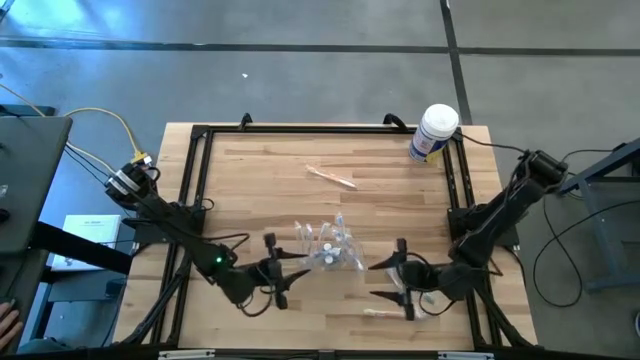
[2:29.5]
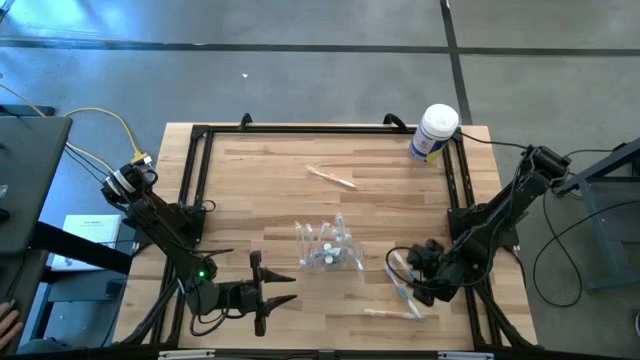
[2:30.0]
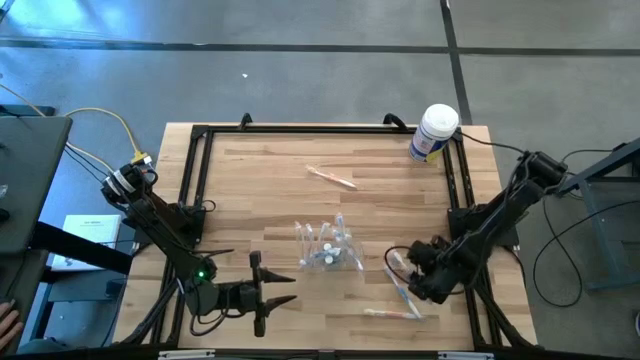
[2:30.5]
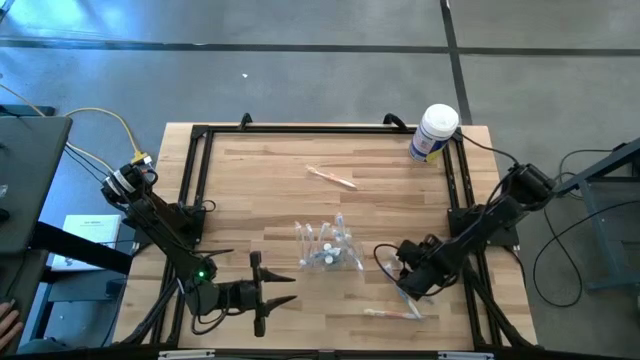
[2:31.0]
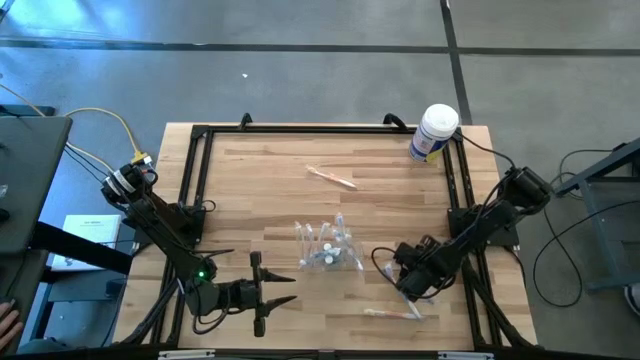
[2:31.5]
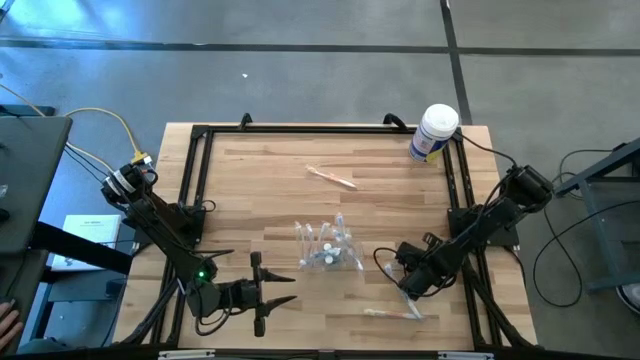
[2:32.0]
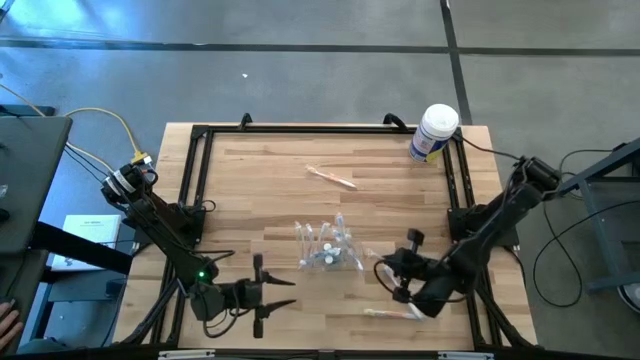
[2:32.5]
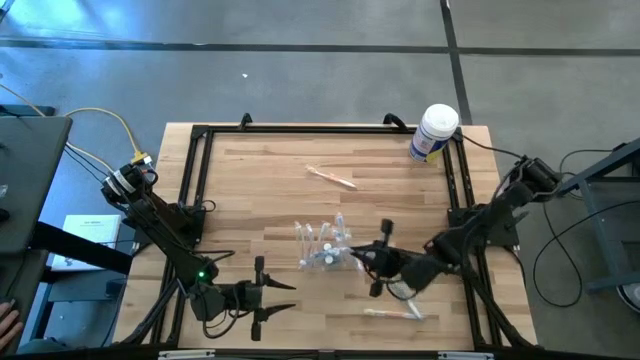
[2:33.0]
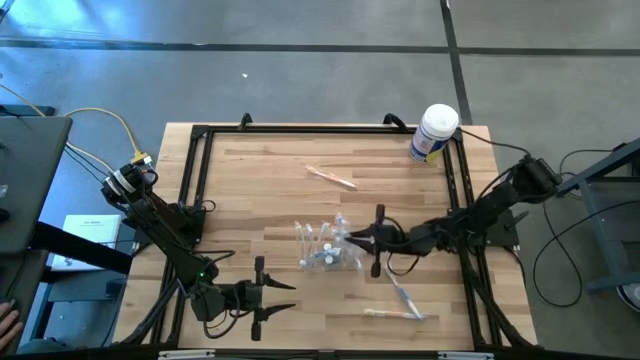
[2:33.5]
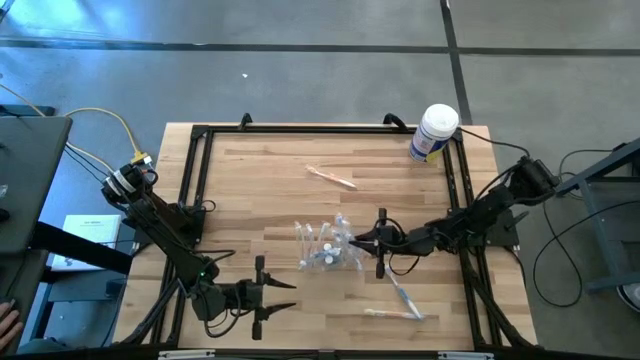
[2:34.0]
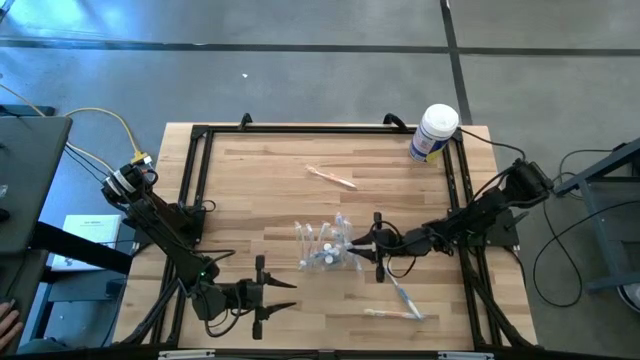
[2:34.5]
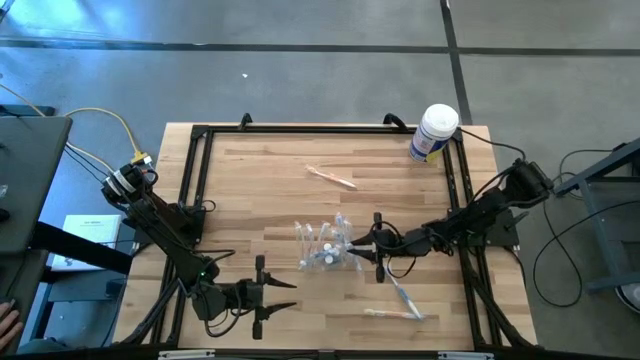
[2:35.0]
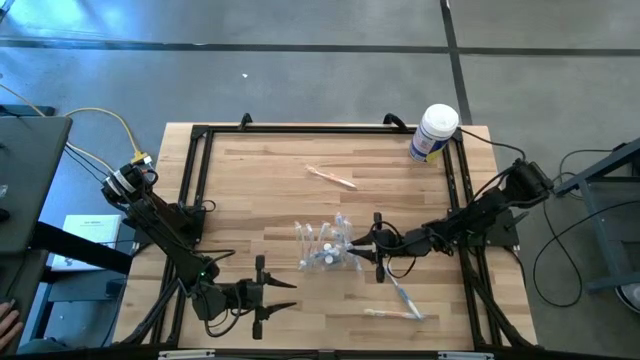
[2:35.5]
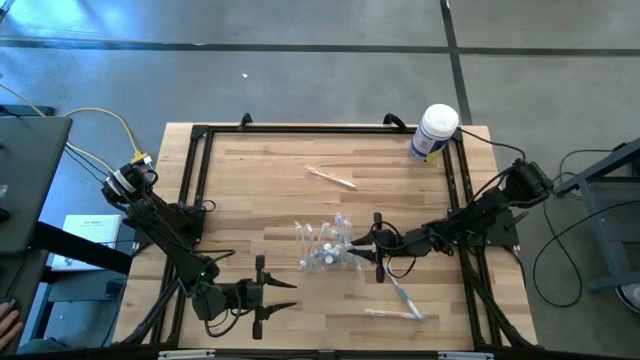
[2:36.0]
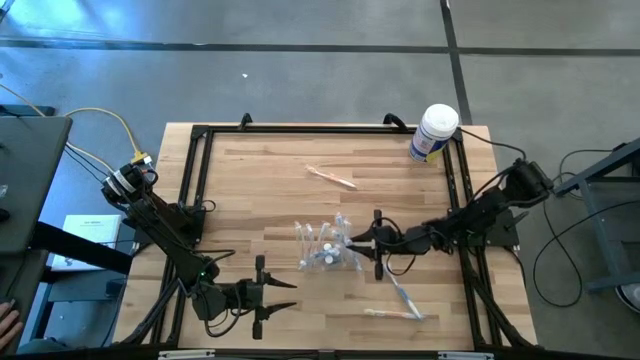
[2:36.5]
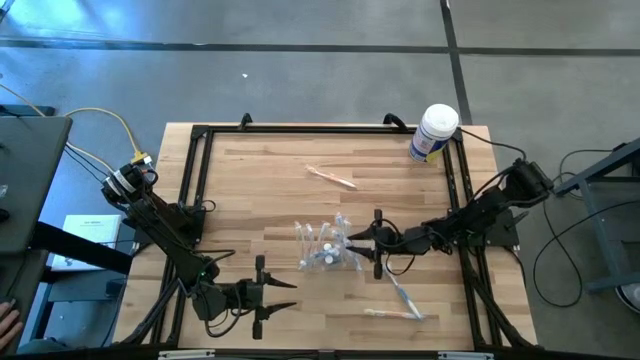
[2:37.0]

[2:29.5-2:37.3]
Task: Pick & Place toothbrushing station
Put the blue toothbrush into the transparent organizer

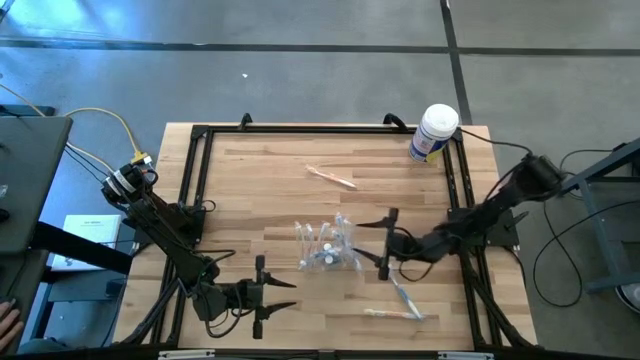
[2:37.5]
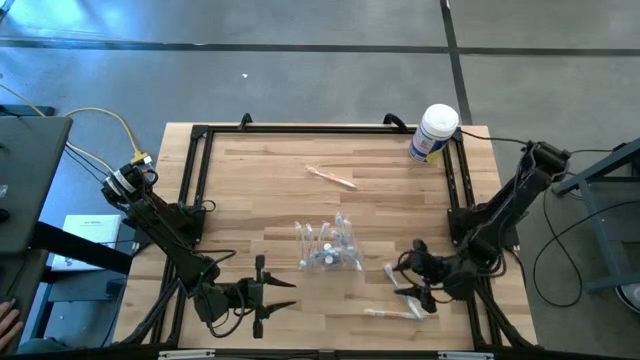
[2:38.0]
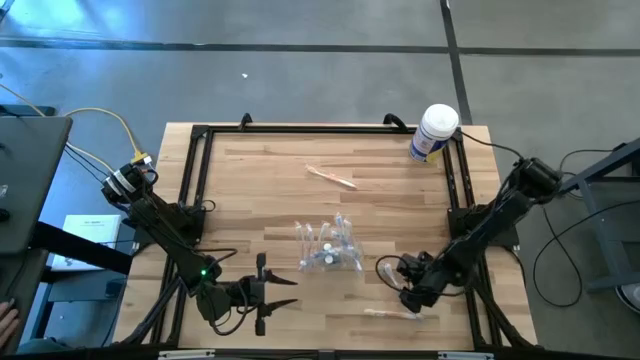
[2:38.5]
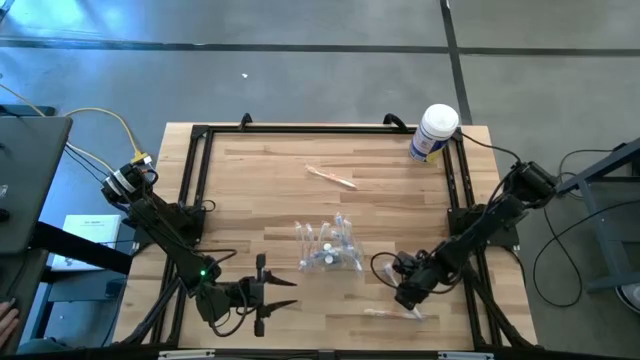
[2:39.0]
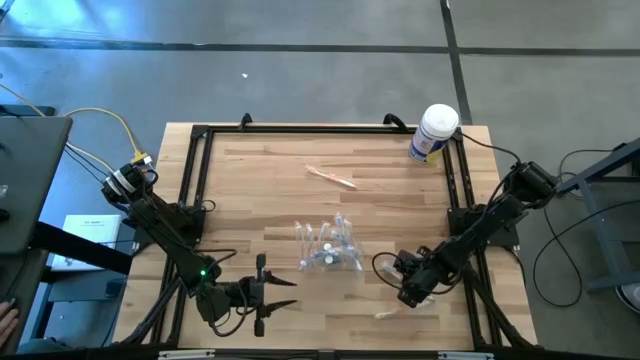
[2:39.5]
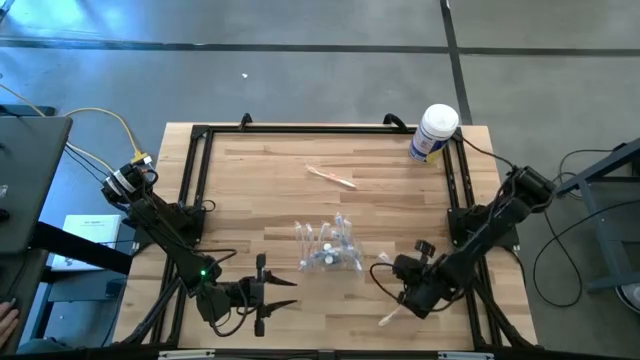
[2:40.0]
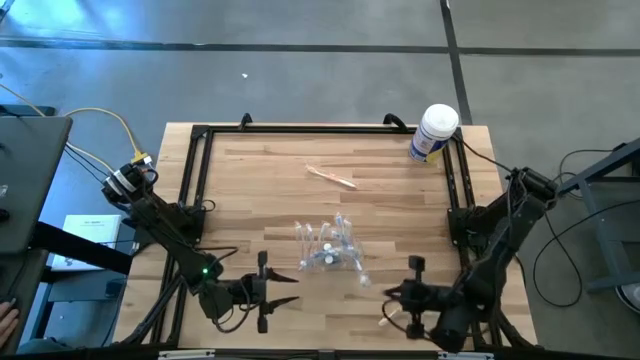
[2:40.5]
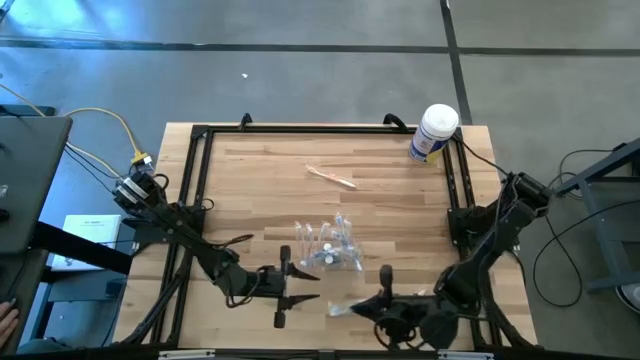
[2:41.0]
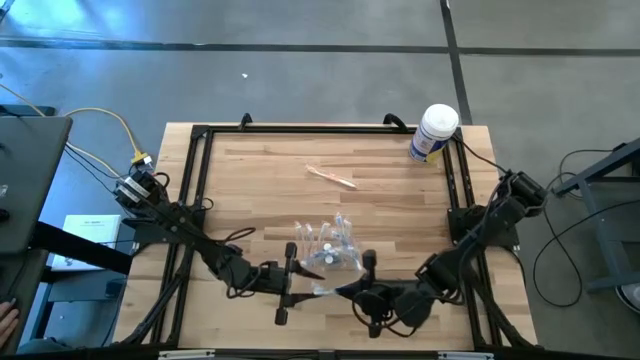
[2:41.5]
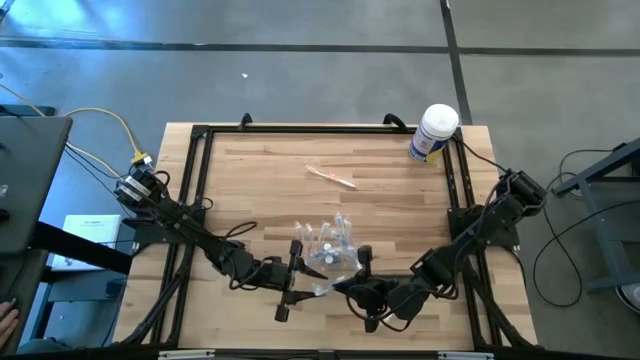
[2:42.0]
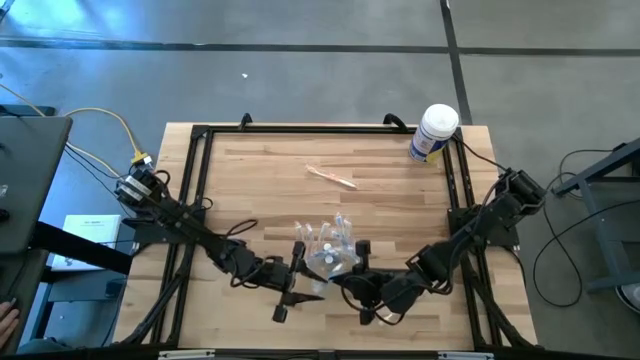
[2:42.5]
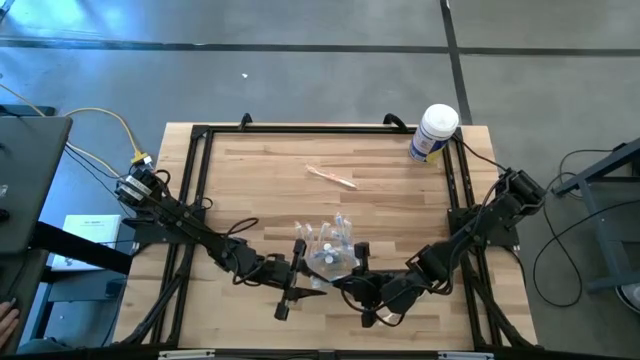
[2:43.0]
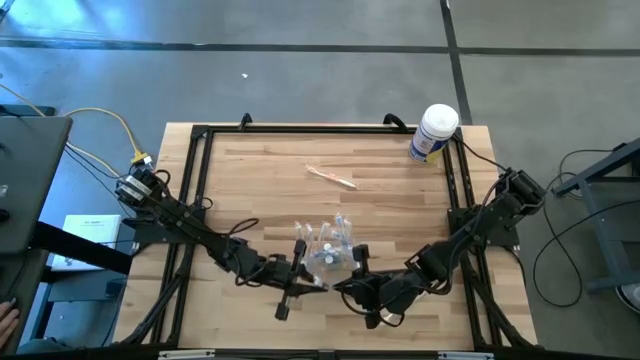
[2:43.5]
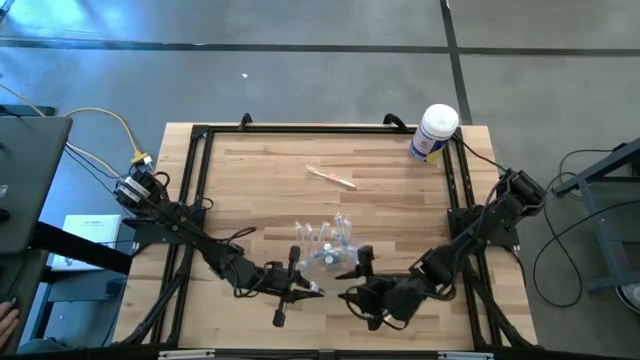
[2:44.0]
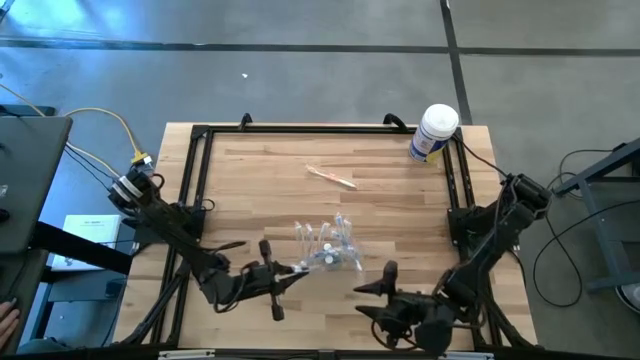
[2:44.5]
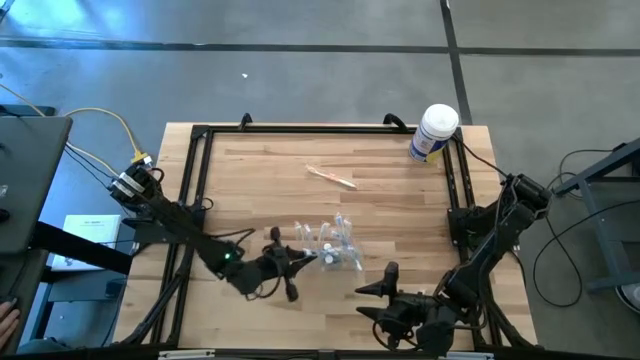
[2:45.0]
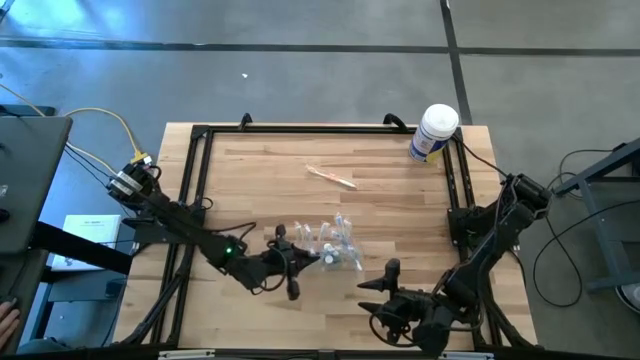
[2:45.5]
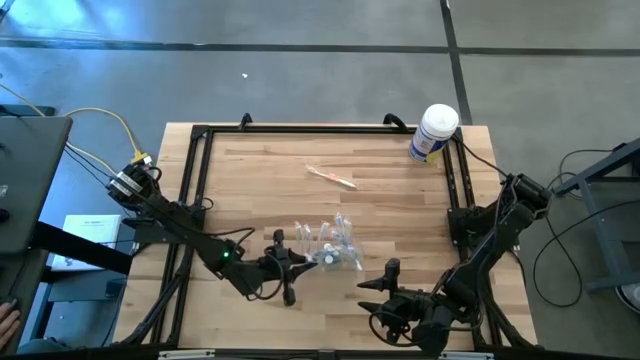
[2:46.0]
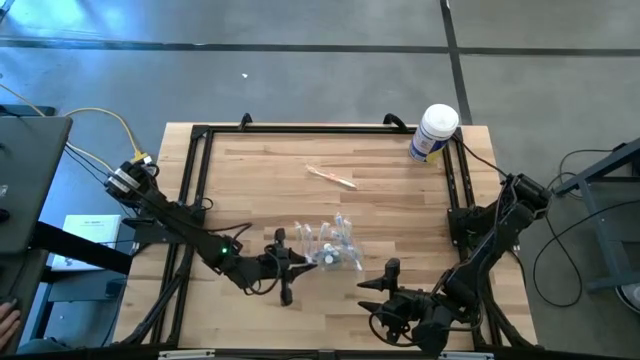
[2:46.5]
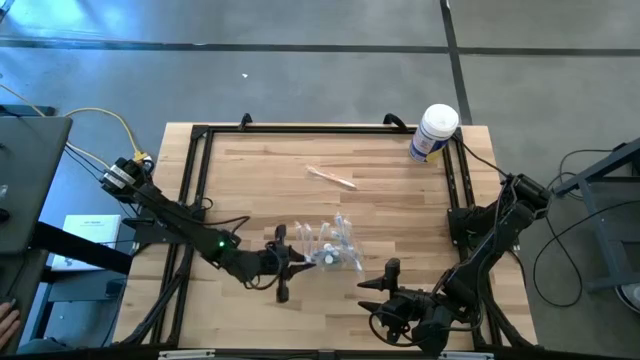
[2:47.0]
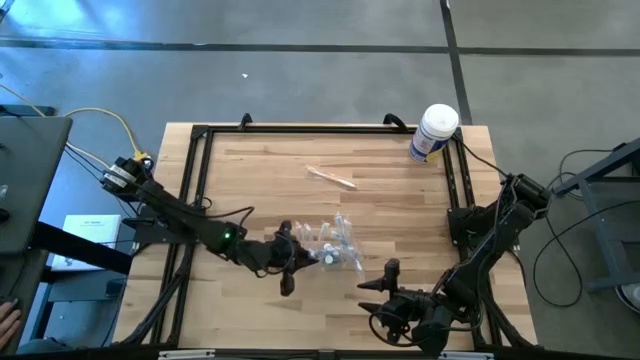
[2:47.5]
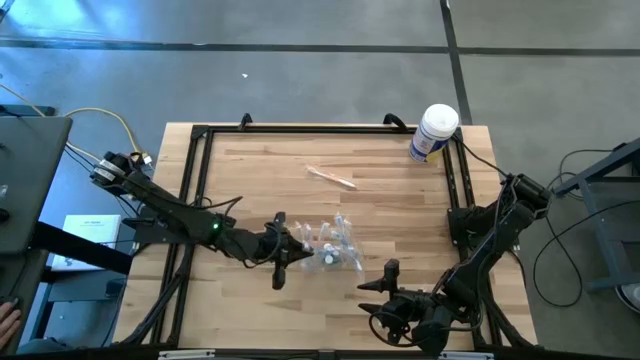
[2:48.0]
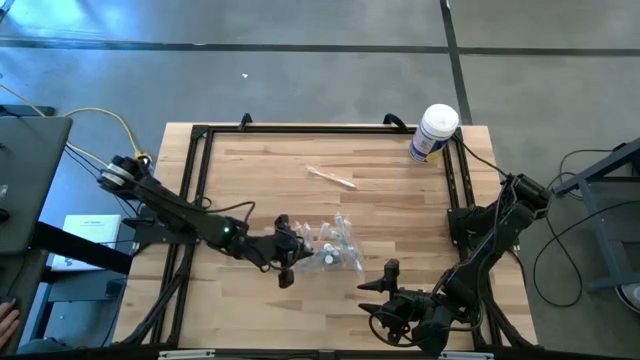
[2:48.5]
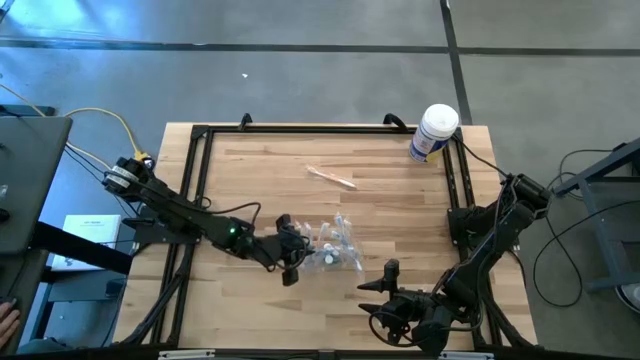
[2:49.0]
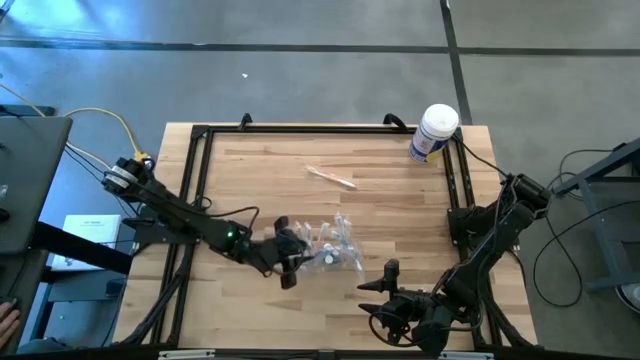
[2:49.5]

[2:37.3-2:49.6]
Put the blue toothbrush into the transparent organizer

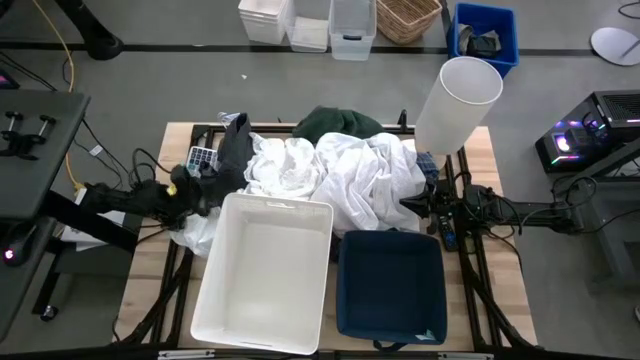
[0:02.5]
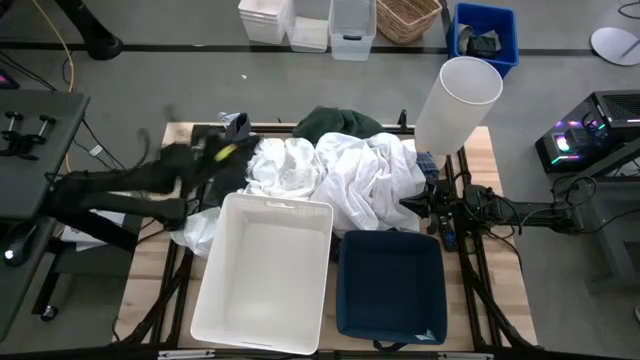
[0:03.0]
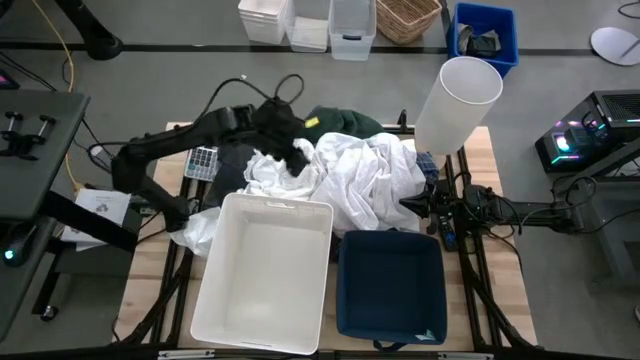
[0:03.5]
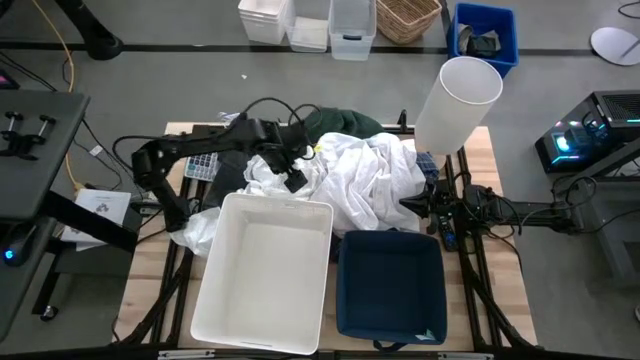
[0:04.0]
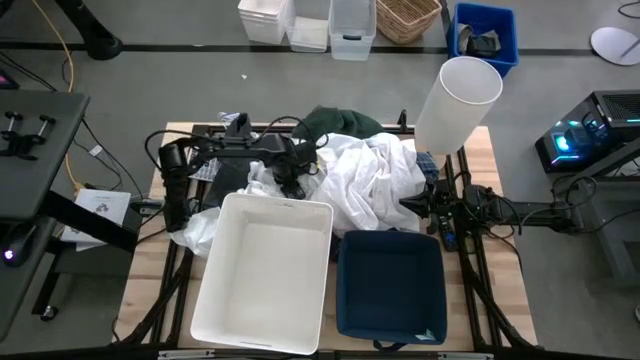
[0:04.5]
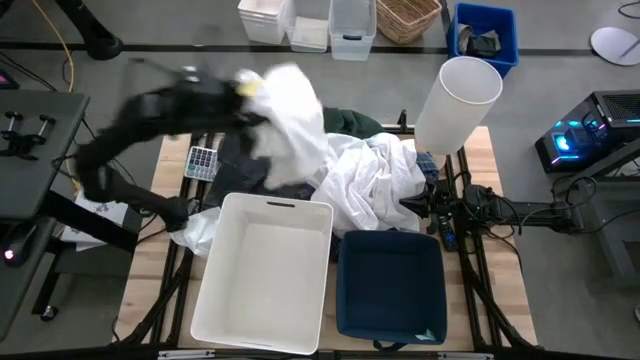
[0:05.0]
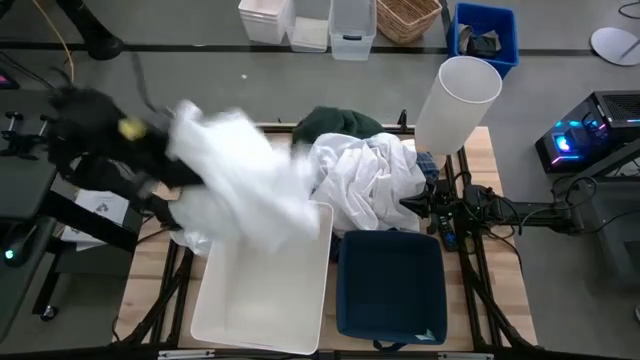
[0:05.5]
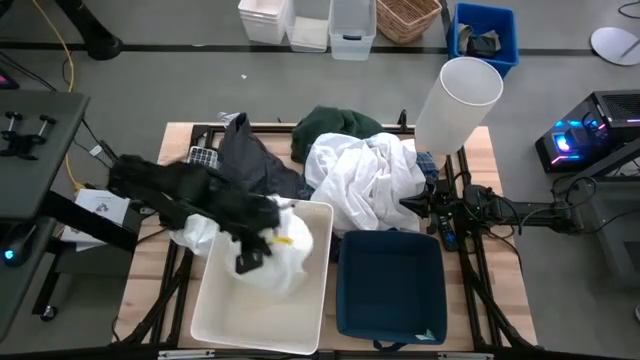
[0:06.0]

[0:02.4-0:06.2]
Task: Sort clothes
Put the white dress into the white laundry bin
